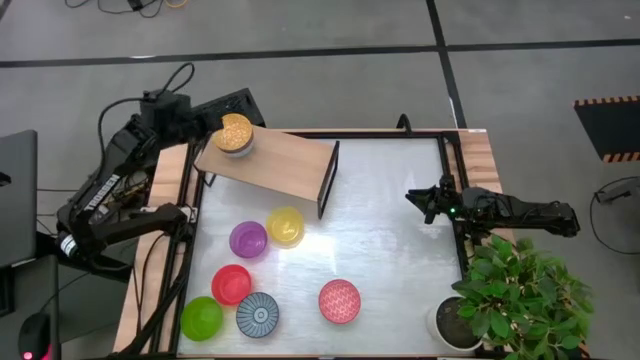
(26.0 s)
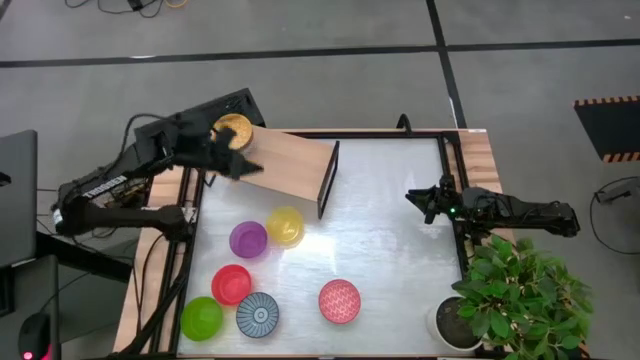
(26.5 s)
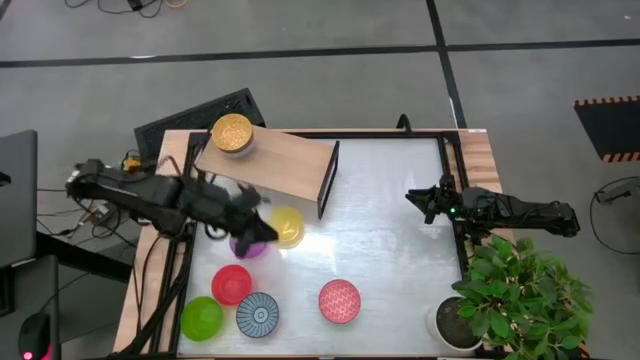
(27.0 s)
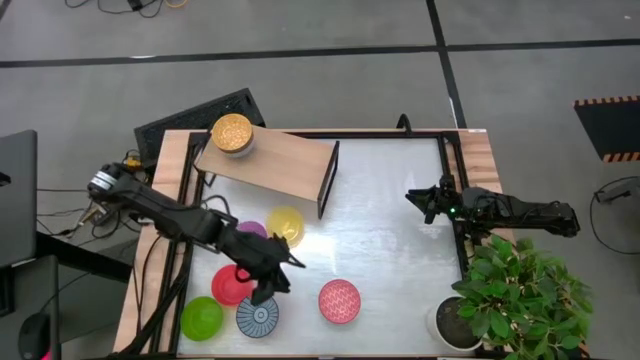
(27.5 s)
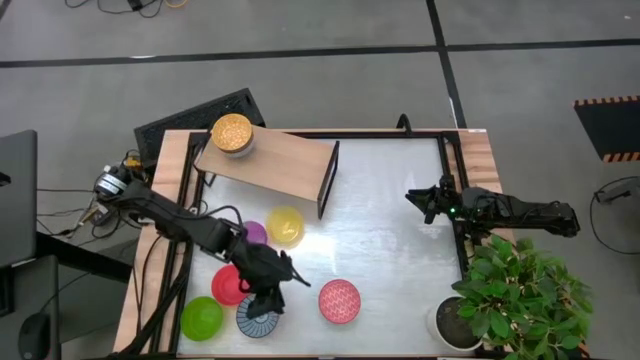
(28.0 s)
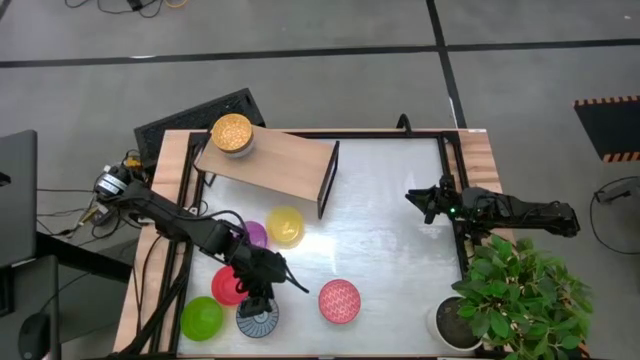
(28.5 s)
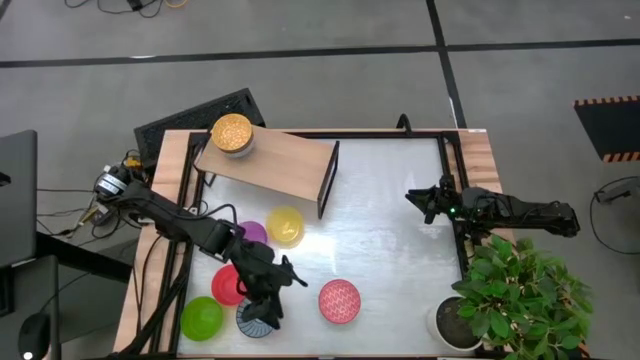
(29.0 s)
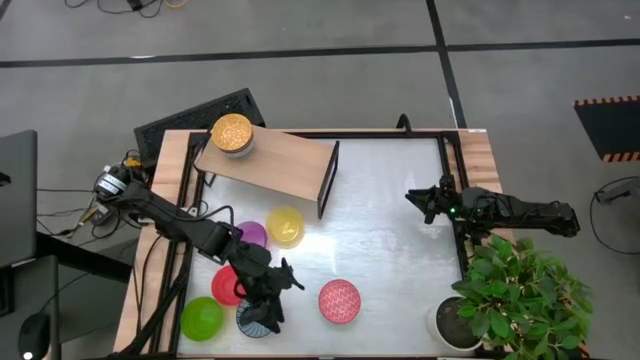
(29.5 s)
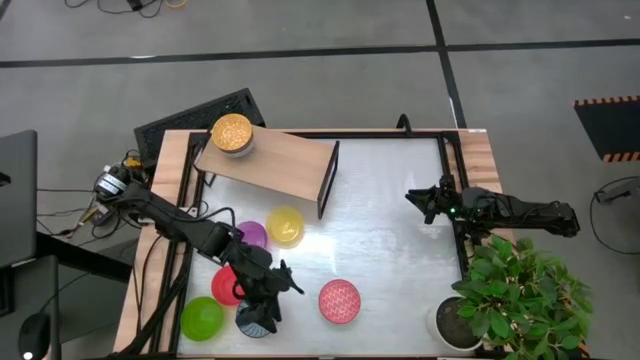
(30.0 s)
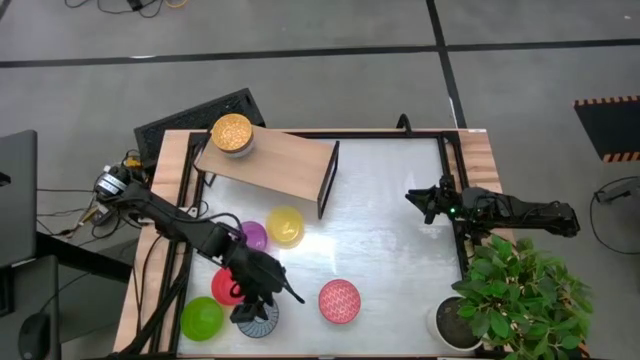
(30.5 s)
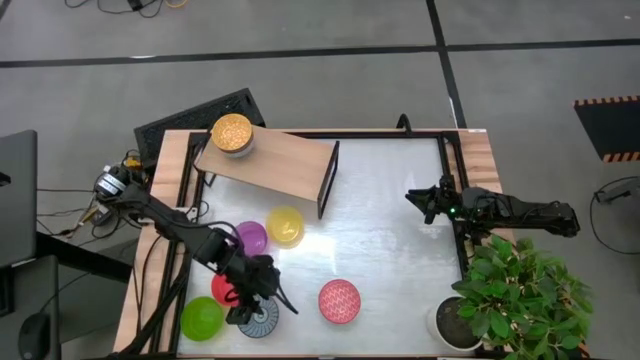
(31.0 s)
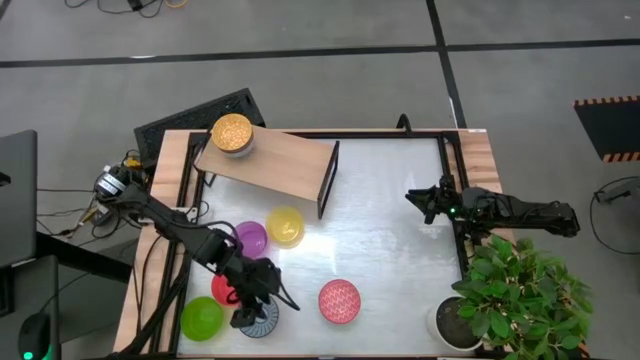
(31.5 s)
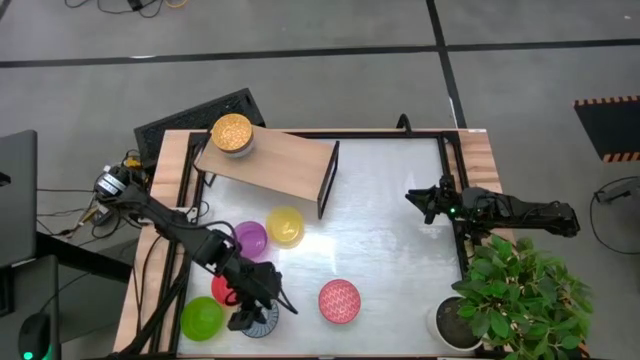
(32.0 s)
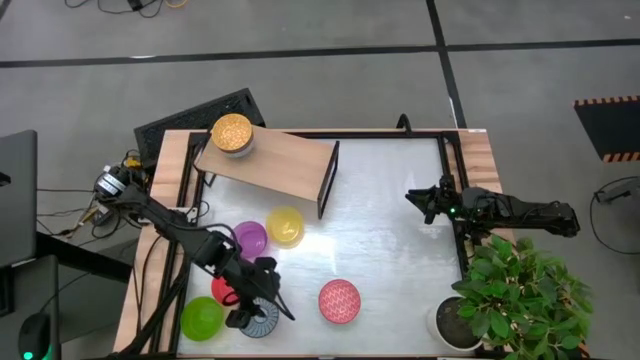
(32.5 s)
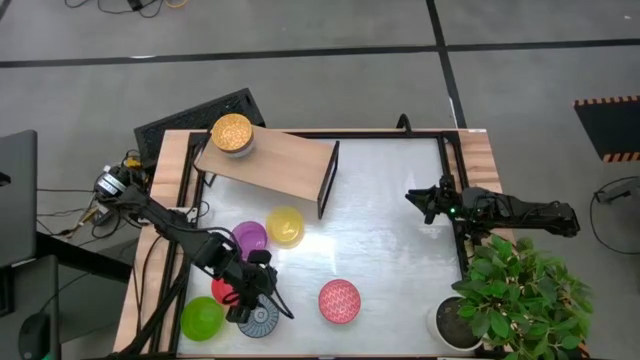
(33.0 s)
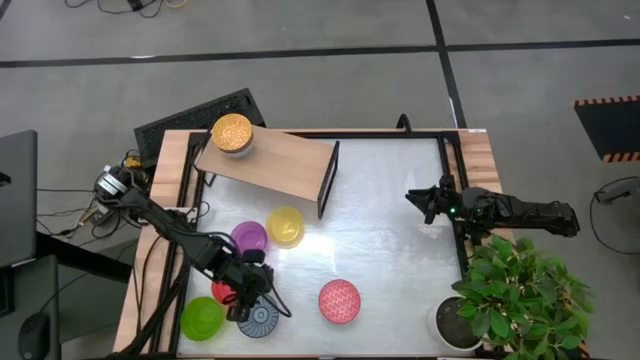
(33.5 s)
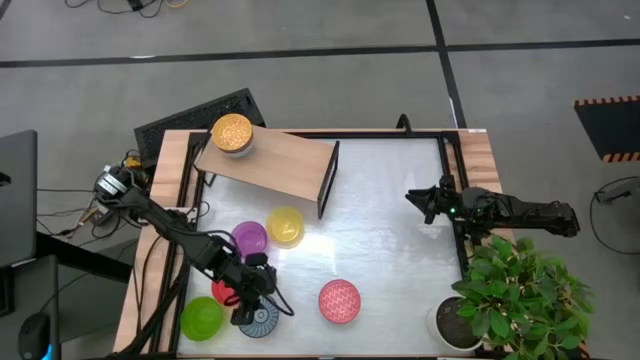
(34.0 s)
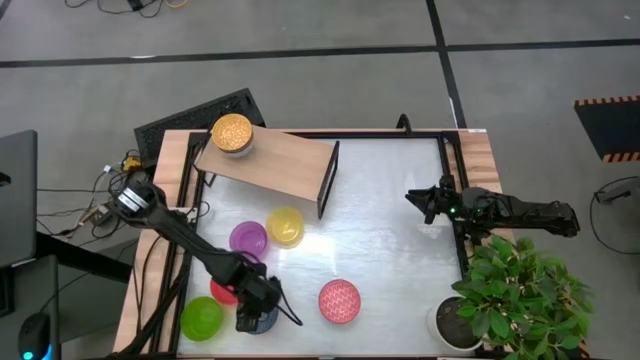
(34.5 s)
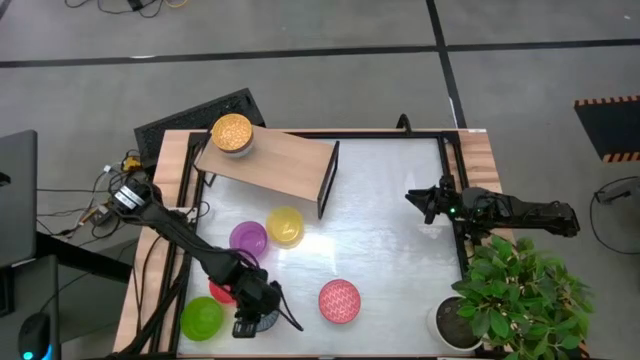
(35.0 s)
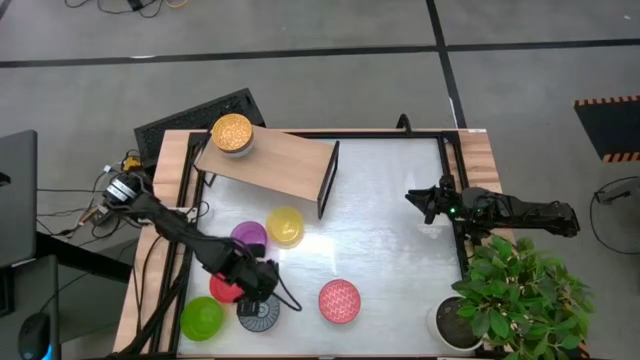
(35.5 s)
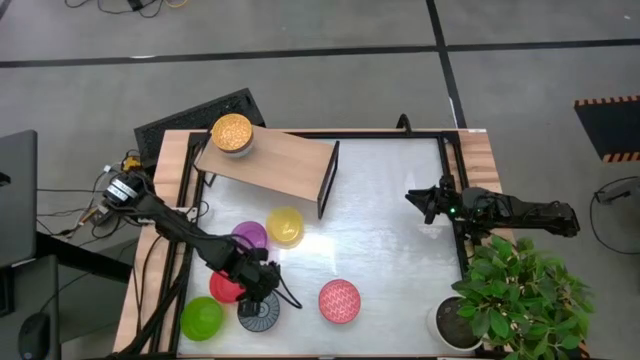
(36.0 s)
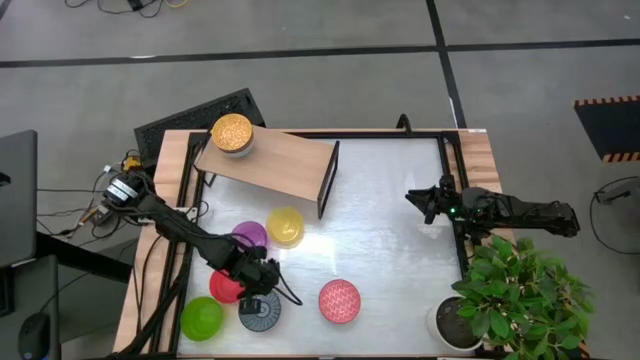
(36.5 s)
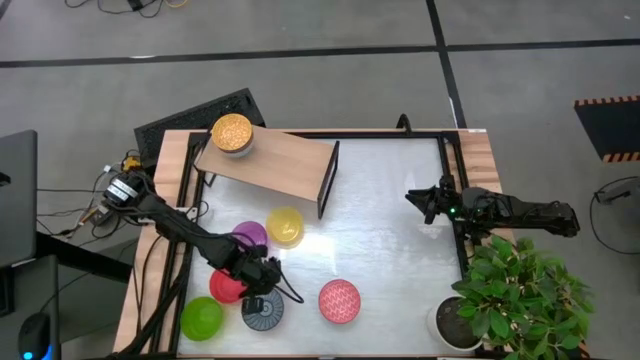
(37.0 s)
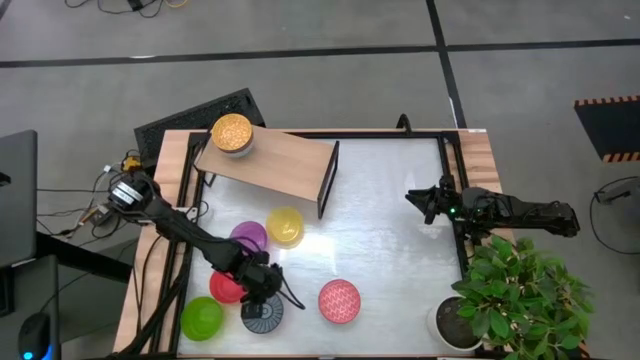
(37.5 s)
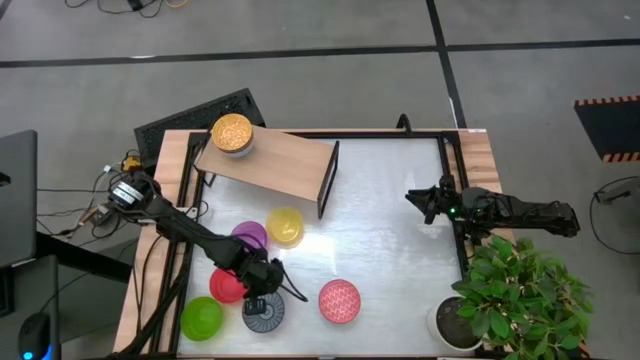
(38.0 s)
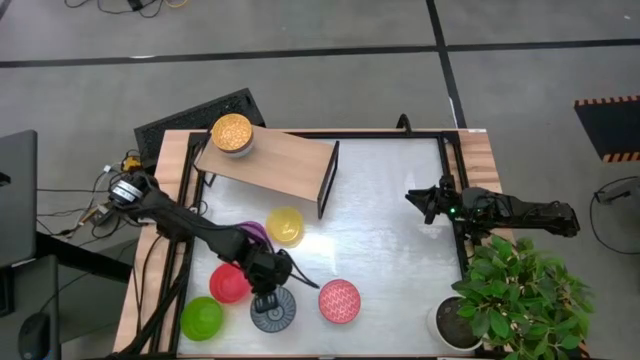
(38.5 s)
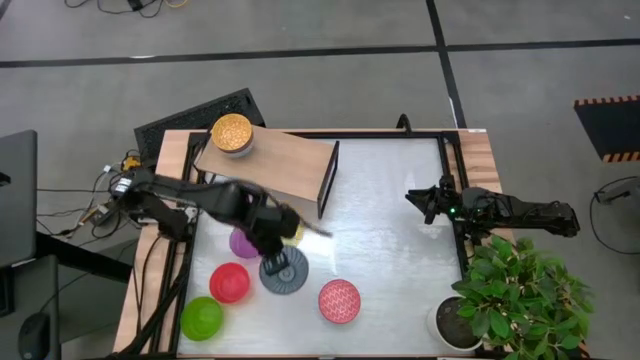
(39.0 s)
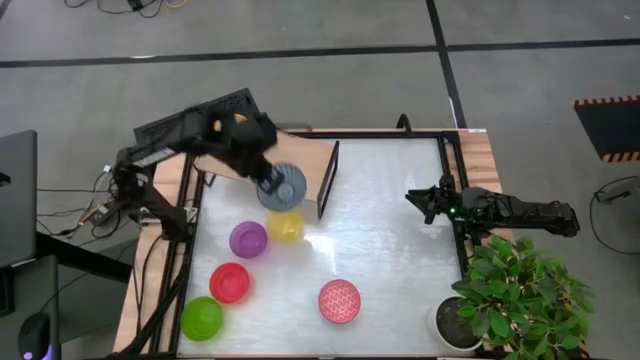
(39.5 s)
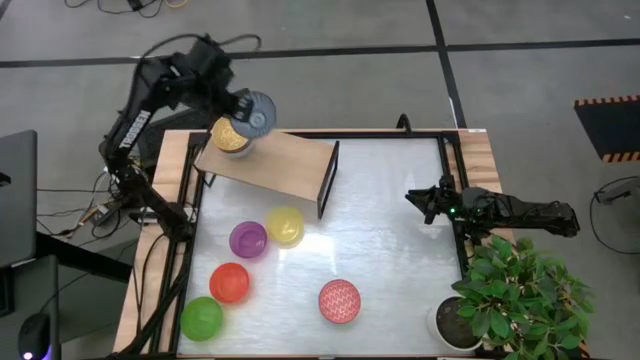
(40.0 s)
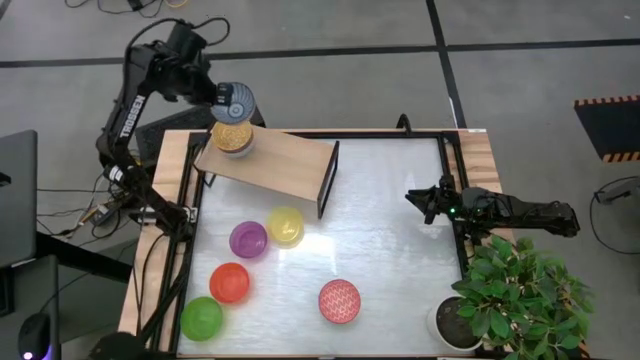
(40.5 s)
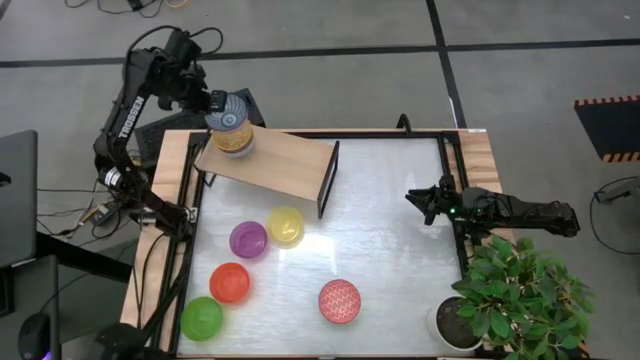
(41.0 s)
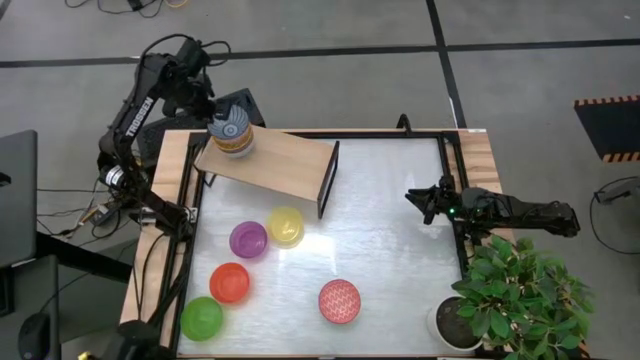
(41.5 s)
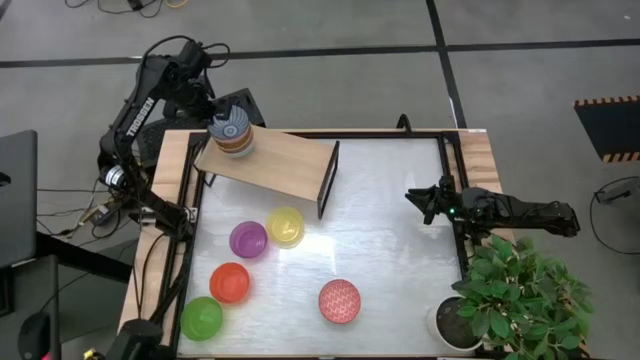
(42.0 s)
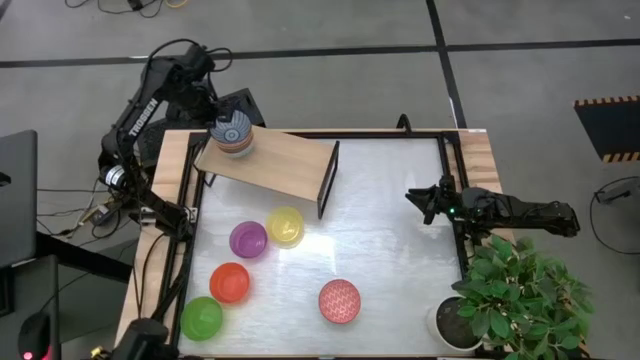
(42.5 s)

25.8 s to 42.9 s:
Task: Place and stack bowls onto a shelf
Stack the blue patterned bowl on top of the yellow patterned bowl on the shelf

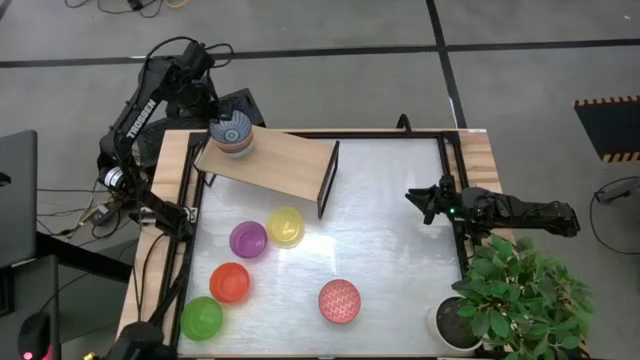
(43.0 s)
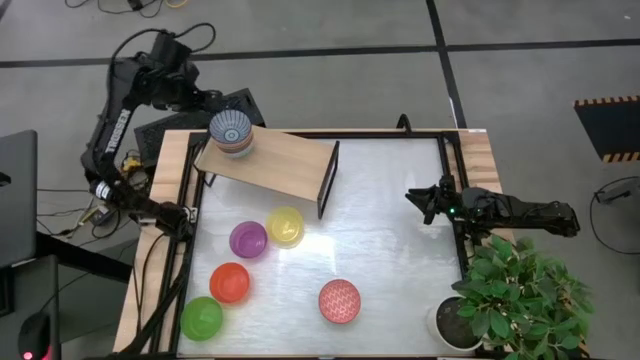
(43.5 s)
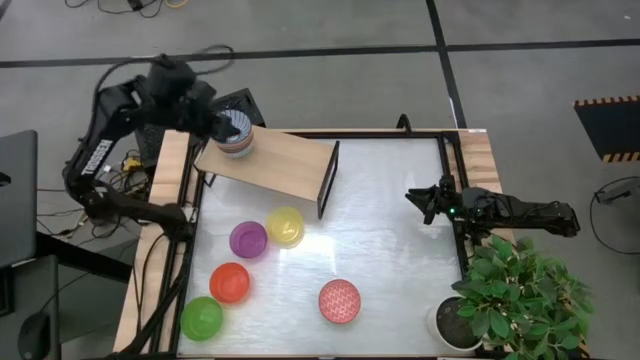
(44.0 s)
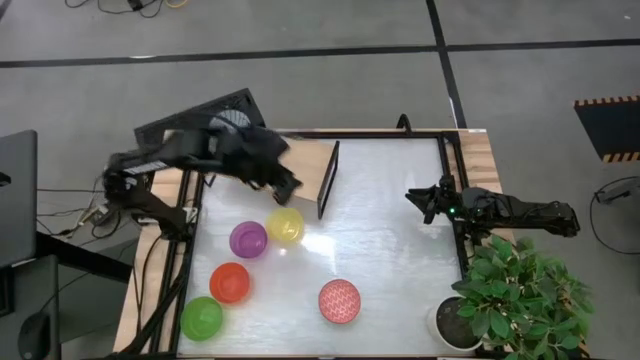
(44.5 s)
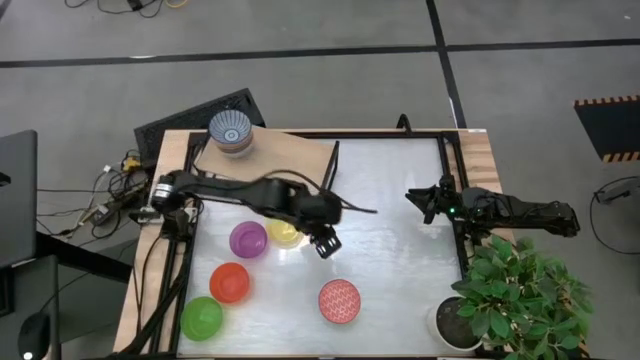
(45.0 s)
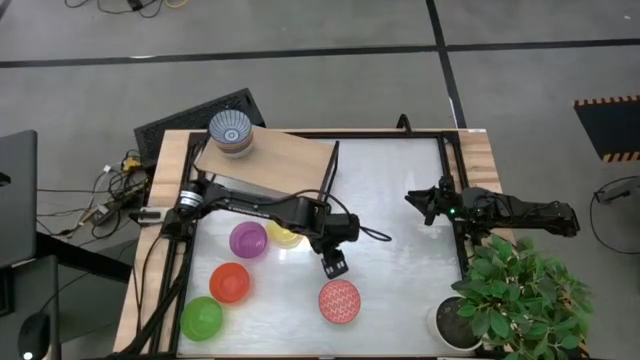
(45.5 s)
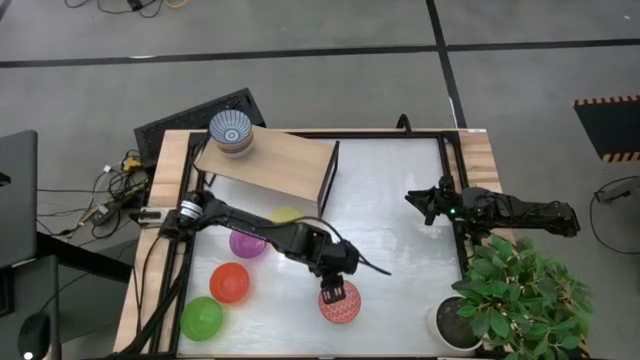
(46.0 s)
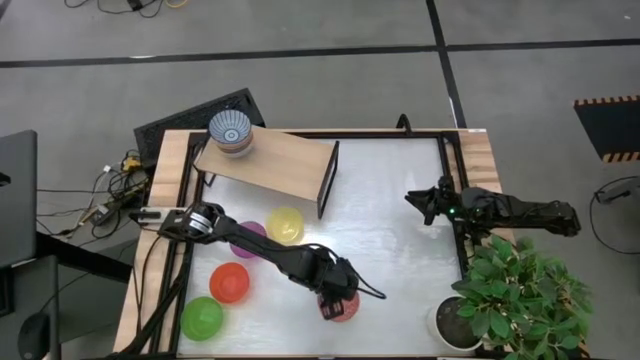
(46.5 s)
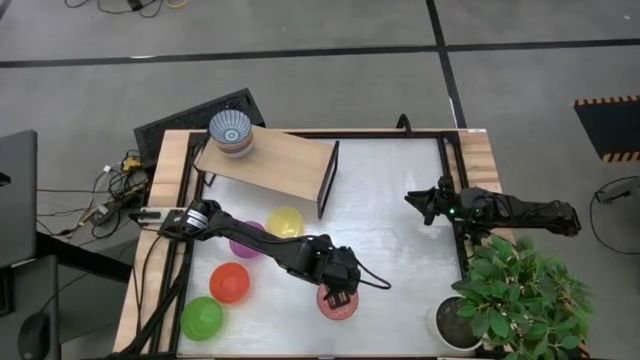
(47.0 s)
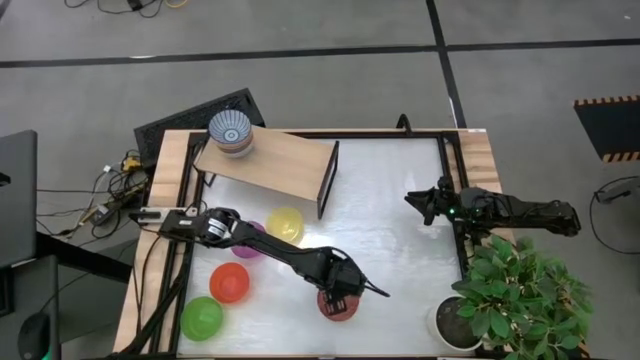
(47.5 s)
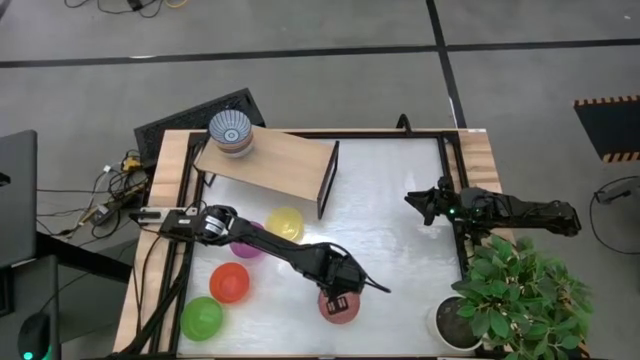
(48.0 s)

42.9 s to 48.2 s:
Stack the red patterned bowl on top of the blue patterned bowl on the shelf
